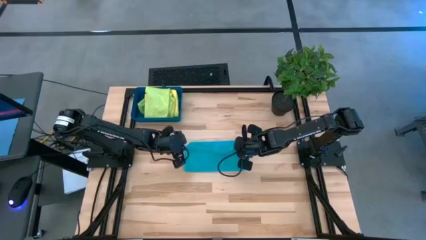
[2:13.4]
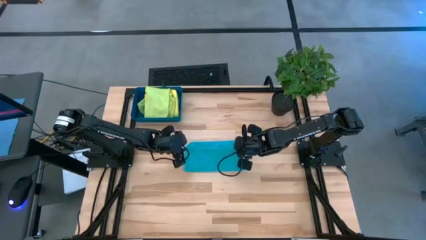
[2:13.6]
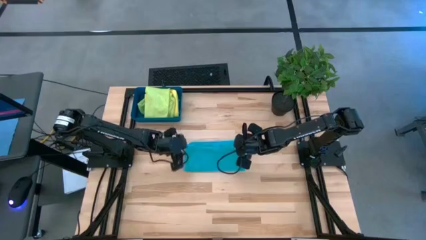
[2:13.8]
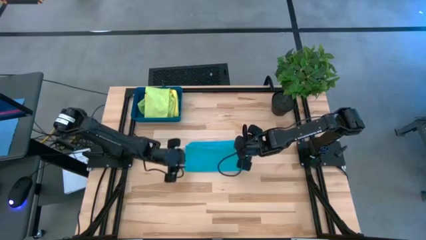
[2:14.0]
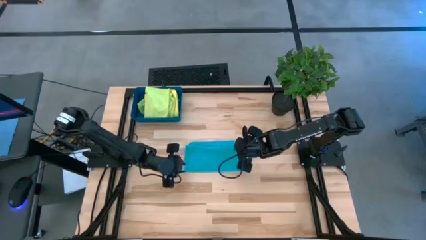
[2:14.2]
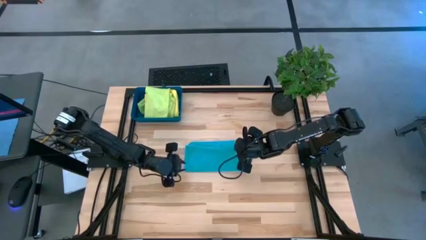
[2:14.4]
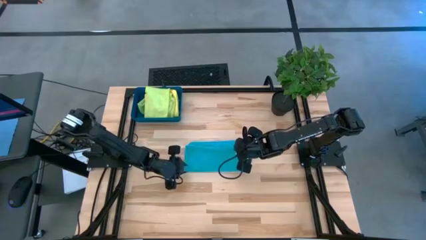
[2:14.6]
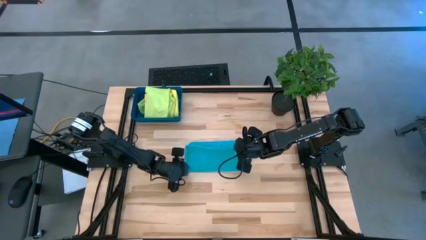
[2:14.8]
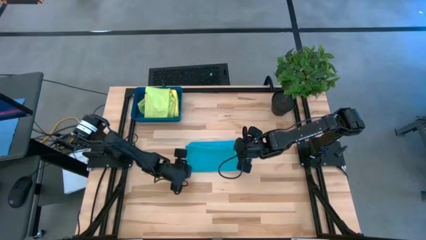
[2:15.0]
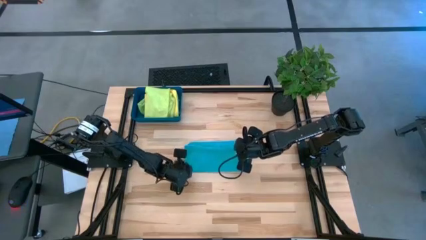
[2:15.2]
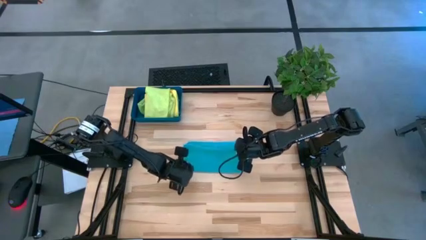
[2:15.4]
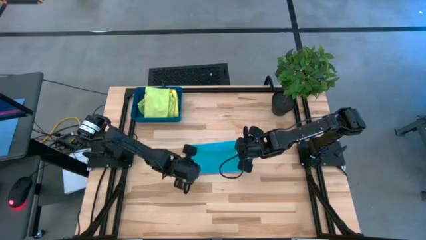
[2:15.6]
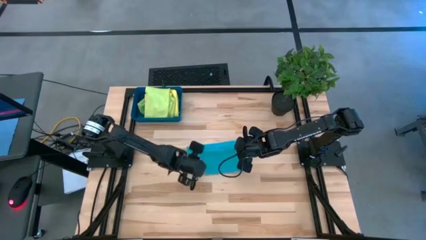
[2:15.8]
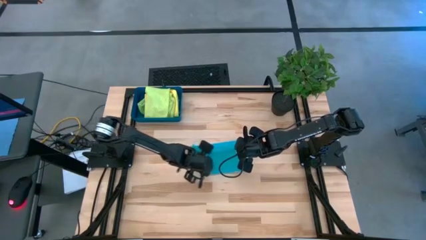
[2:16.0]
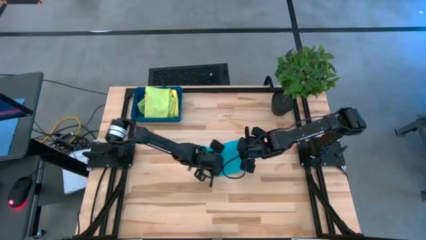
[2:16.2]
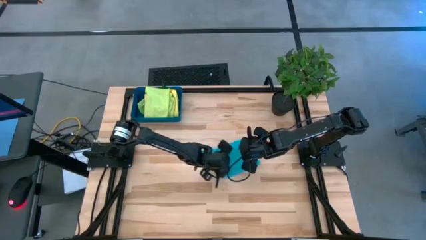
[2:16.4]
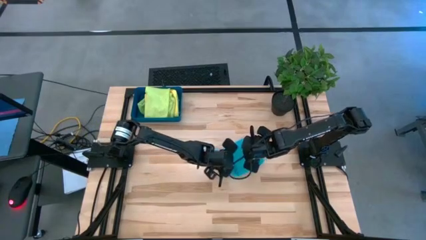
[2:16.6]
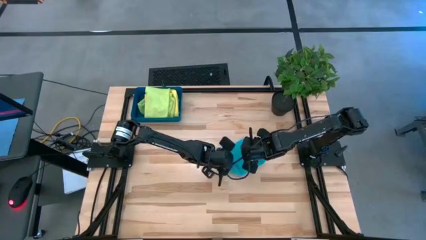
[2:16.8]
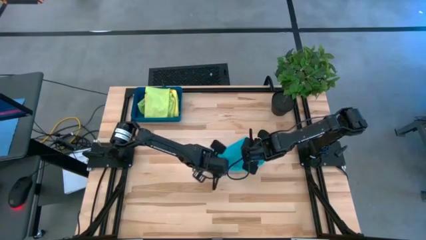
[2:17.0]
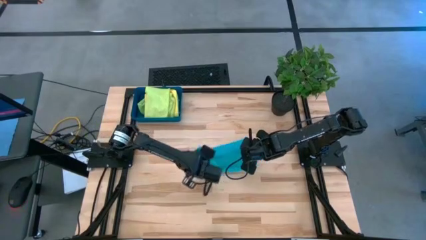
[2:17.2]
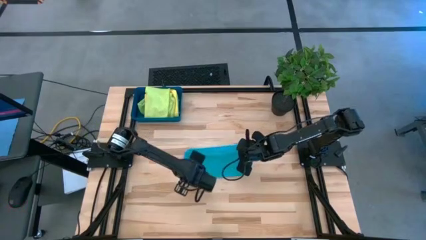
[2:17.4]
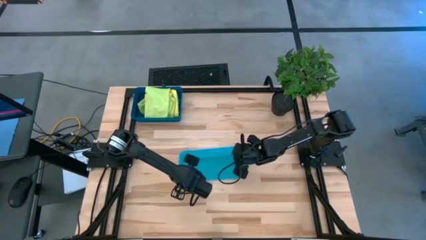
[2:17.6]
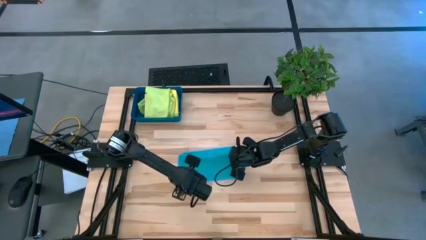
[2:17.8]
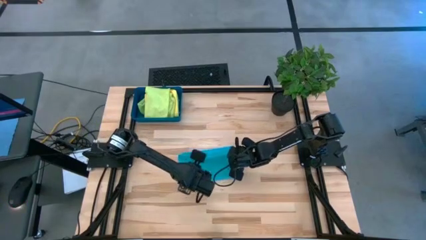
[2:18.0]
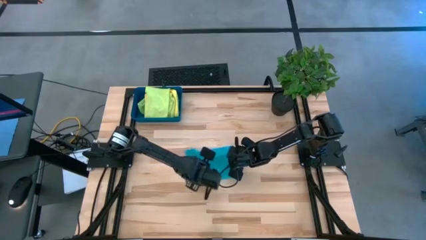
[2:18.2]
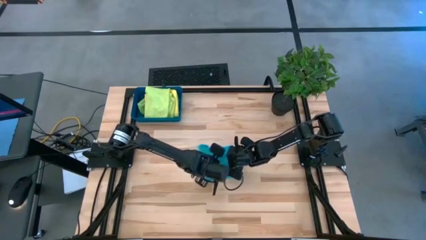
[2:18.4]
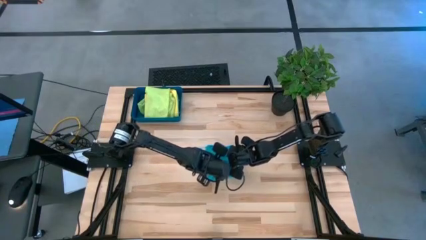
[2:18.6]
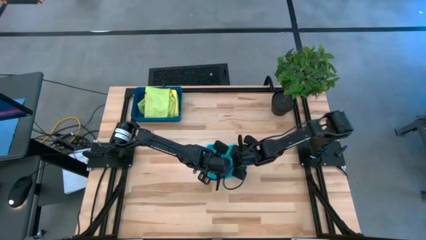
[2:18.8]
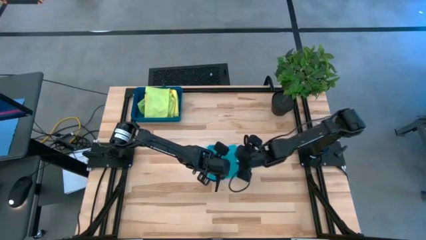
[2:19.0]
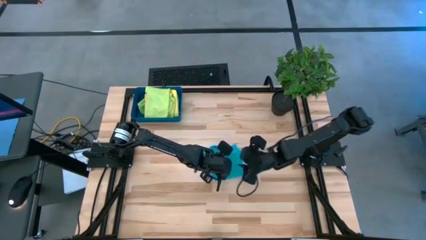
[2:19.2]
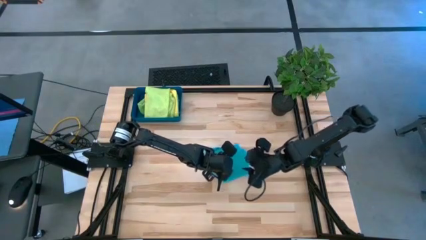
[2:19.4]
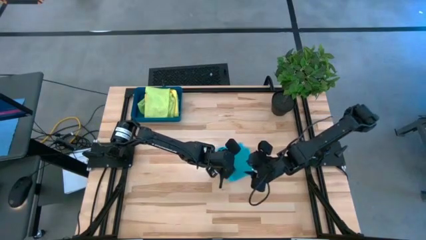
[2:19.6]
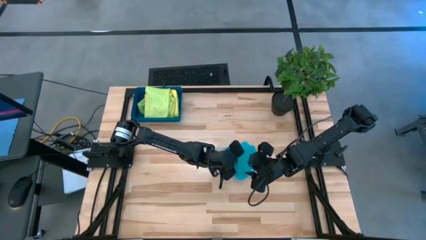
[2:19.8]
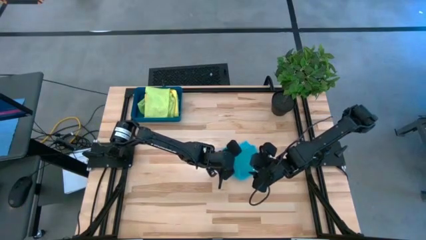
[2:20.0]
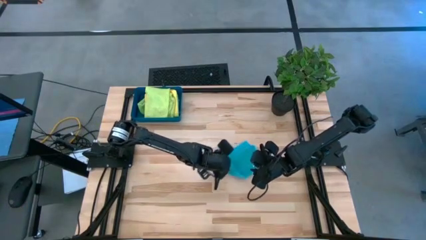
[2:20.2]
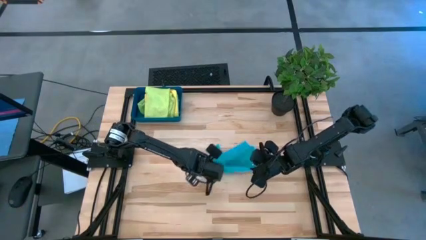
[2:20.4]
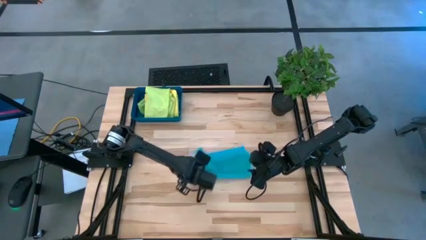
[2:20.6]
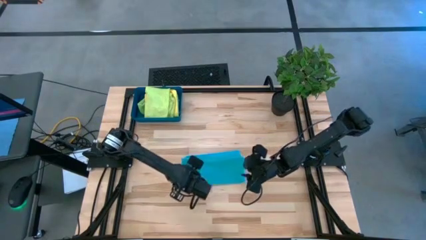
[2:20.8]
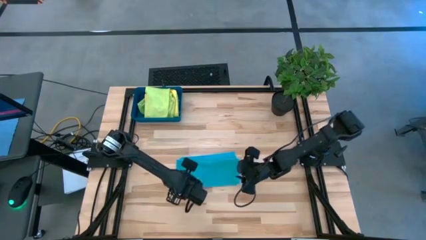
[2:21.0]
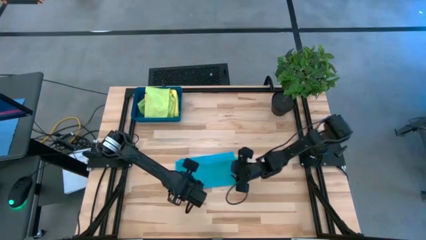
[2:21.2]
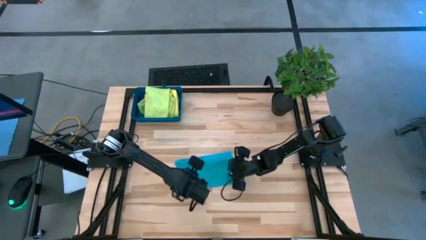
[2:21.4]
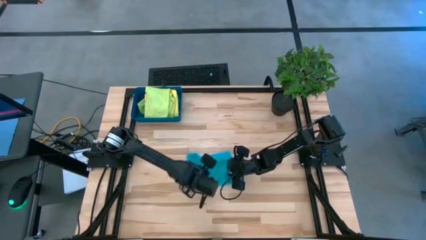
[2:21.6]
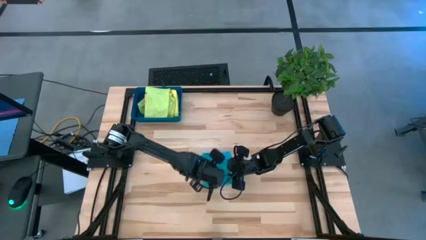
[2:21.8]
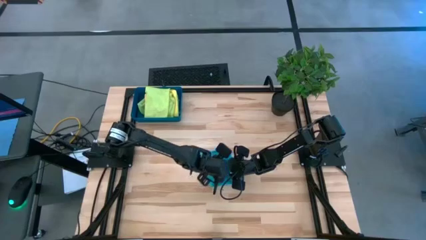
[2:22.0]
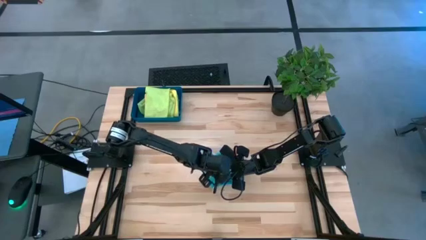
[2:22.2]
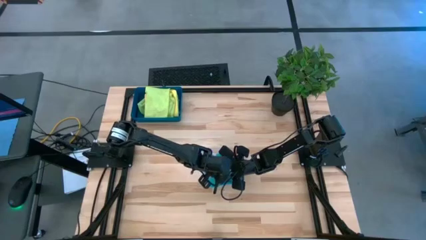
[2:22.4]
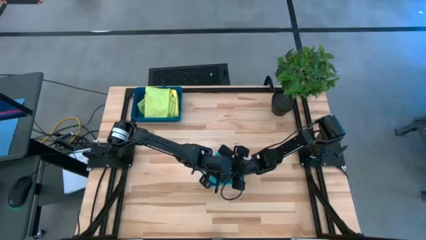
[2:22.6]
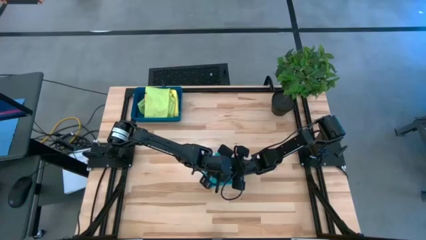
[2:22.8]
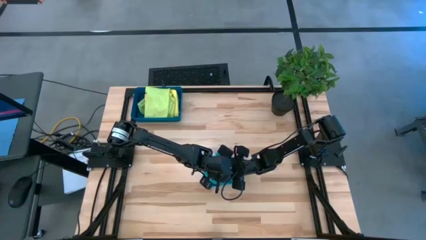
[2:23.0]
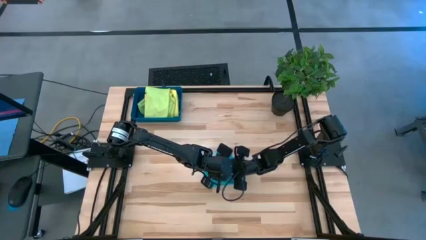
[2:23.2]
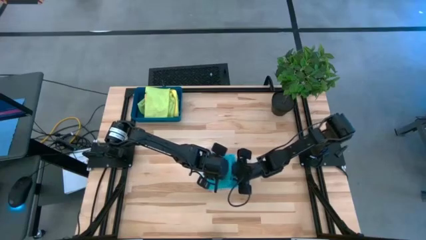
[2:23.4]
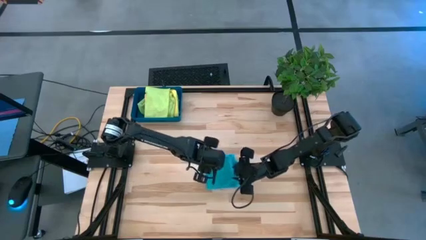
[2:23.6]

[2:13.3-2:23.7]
Task: Fold microfiber towels
Fold the blue towel

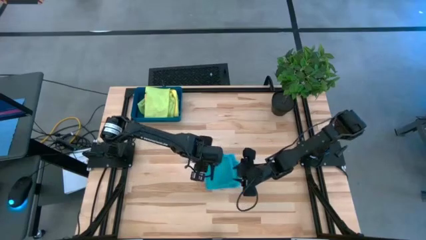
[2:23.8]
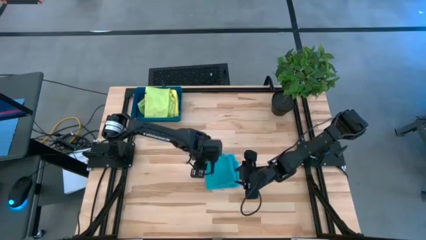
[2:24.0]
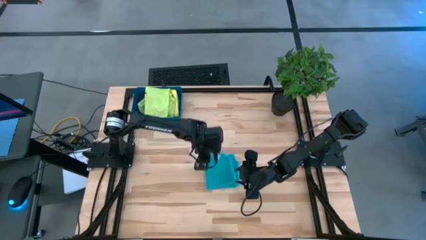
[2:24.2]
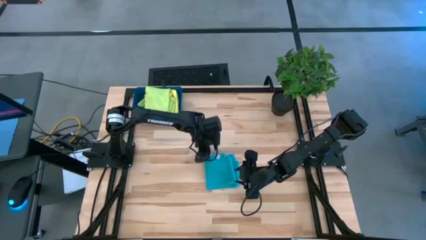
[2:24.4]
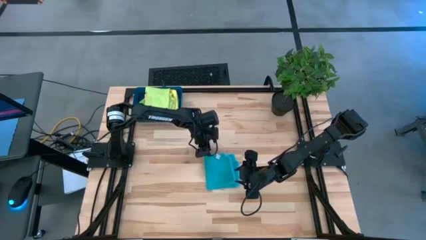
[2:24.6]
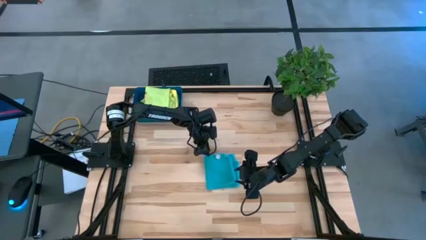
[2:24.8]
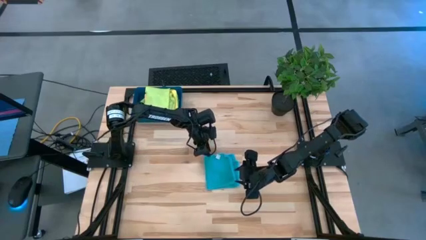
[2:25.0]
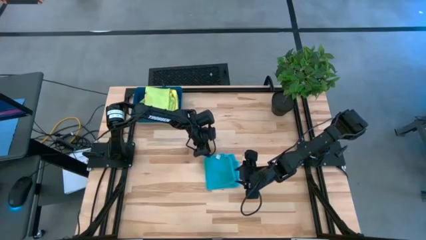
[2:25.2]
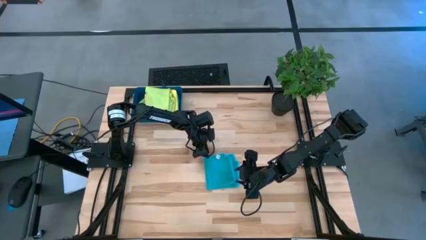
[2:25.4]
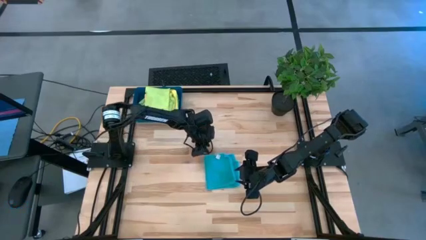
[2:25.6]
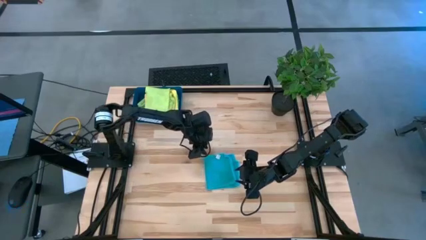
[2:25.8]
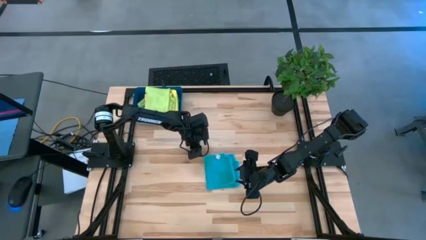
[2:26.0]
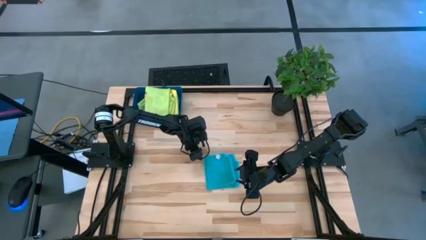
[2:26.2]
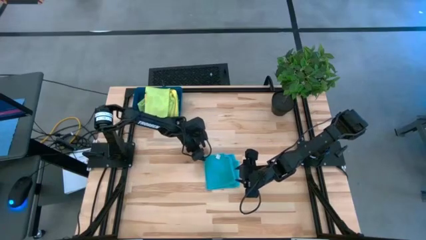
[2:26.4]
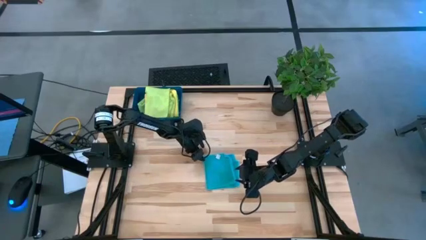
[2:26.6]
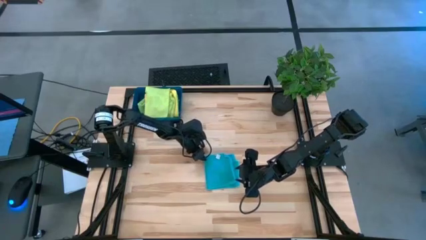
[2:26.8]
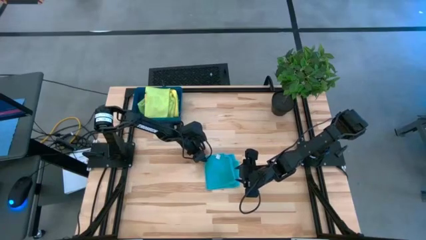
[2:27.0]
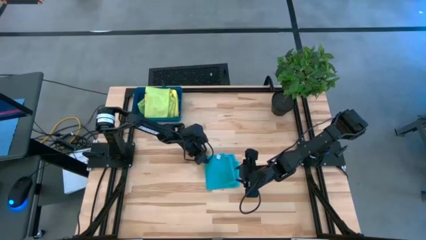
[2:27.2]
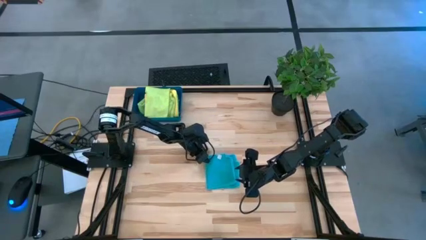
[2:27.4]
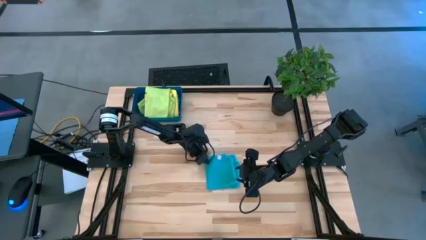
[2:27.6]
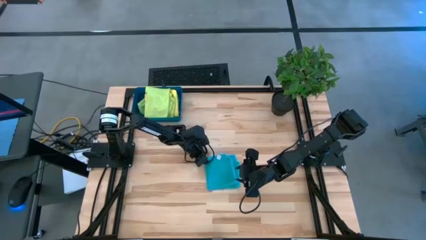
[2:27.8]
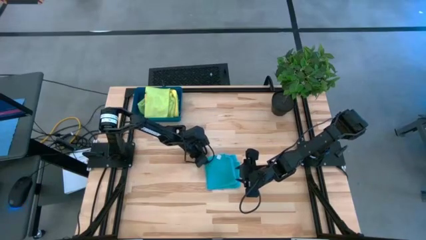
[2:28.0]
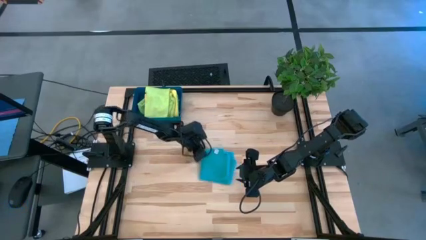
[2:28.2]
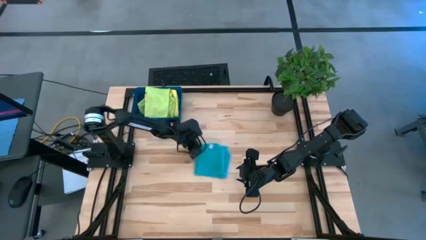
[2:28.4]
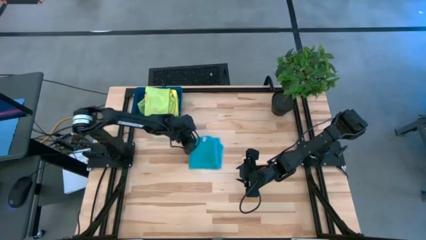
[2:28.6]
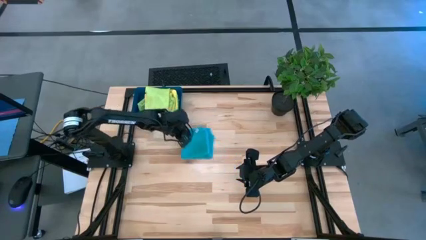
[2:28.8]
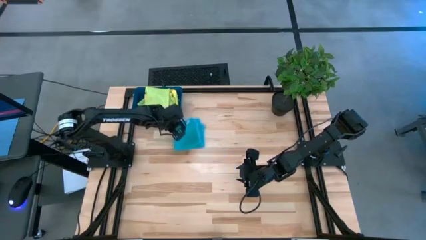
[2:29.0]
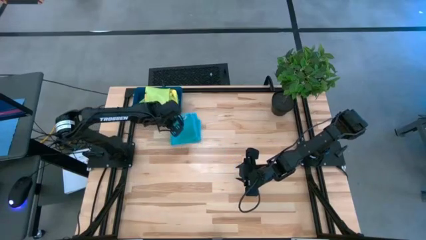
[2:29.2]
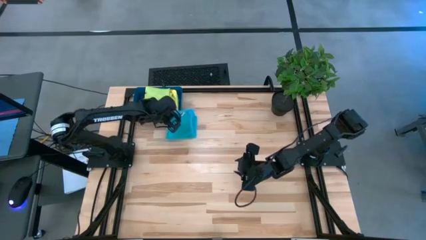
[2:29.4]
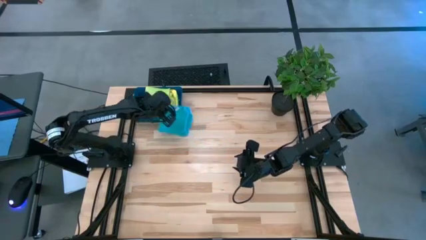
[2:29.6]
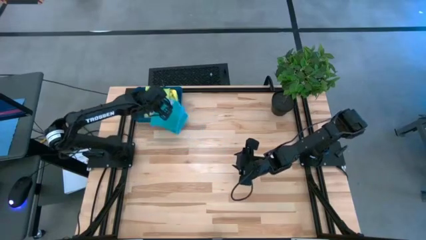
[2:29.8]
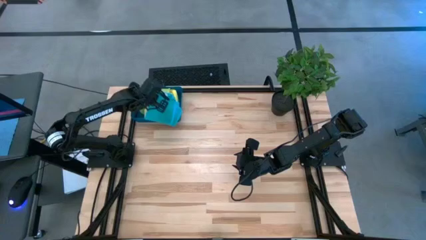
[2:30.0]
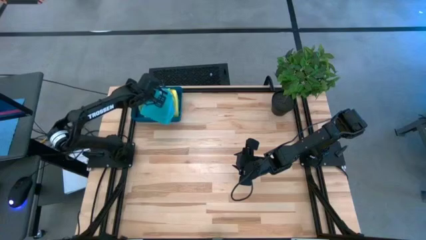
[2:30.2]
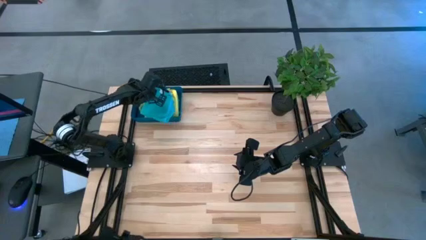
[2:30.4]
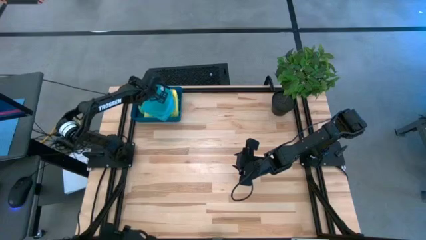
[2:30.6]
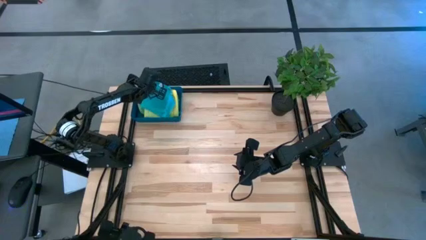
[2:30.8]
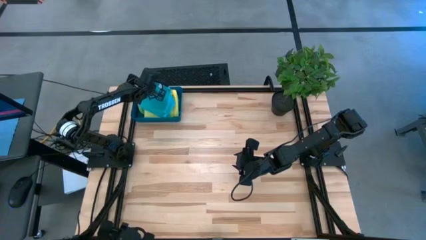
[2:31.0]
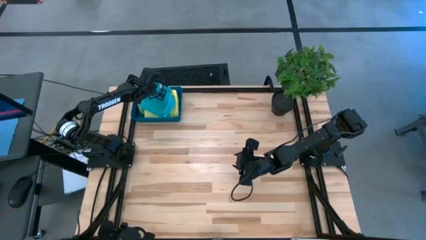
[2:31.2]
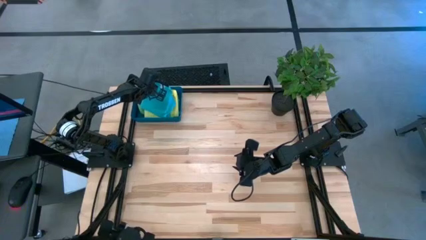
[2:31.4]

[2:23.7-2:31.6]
Put the blue towel into the blue bin
